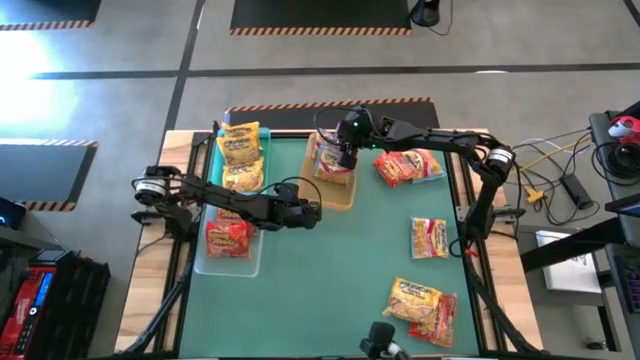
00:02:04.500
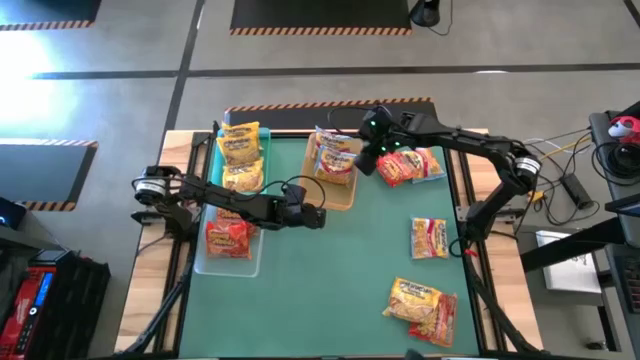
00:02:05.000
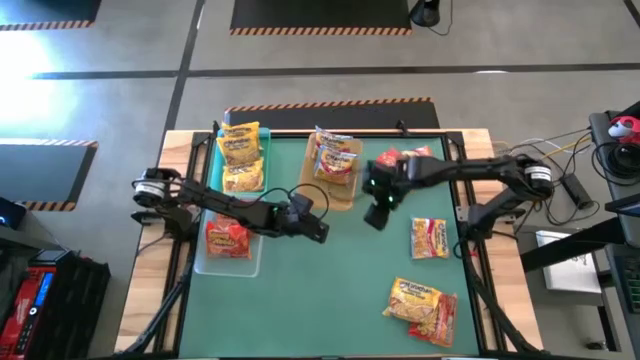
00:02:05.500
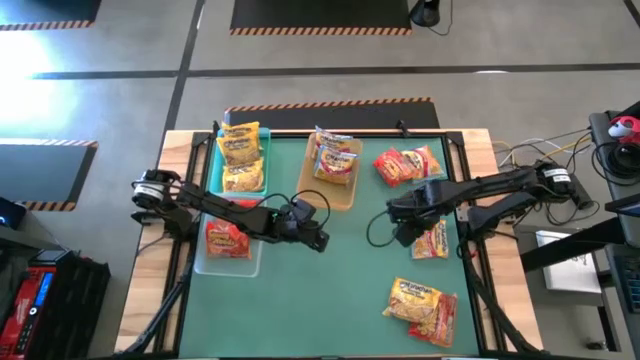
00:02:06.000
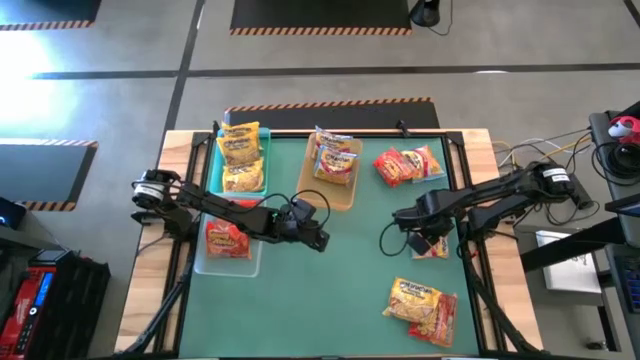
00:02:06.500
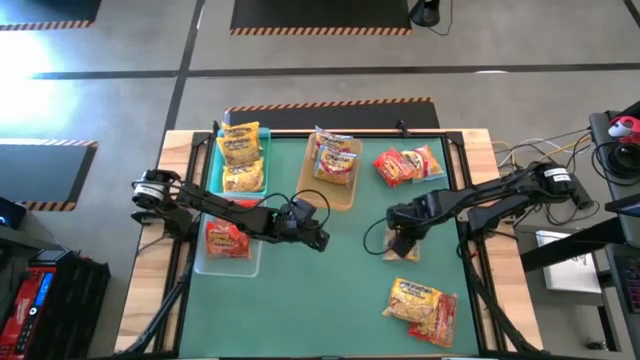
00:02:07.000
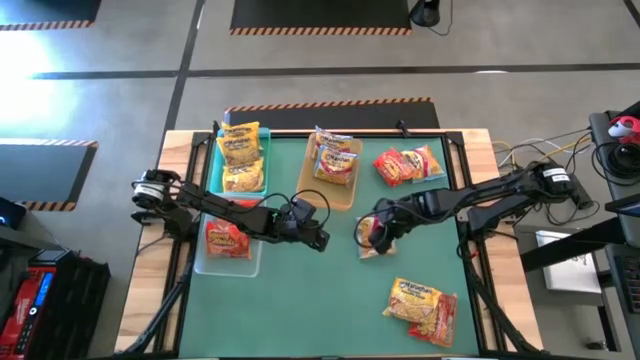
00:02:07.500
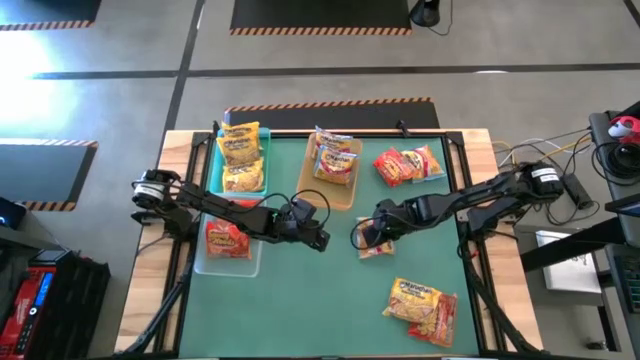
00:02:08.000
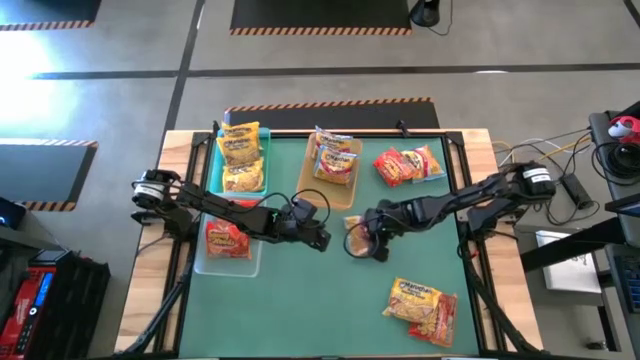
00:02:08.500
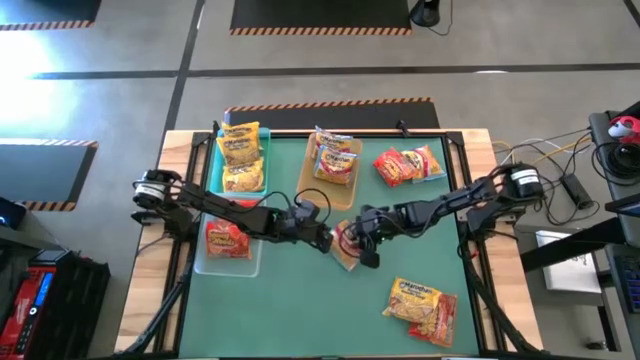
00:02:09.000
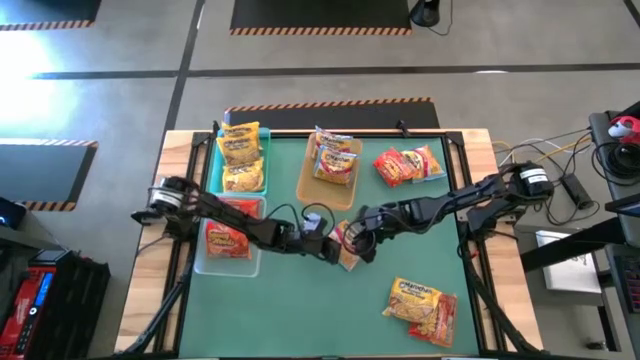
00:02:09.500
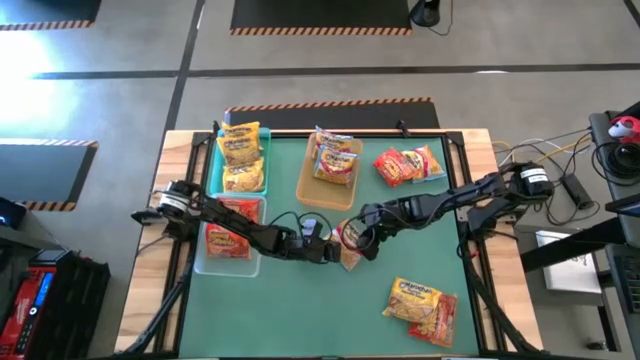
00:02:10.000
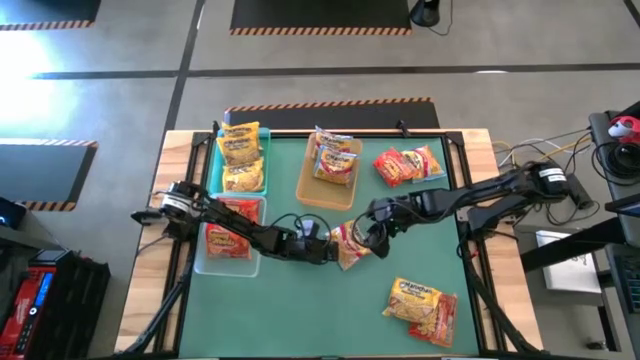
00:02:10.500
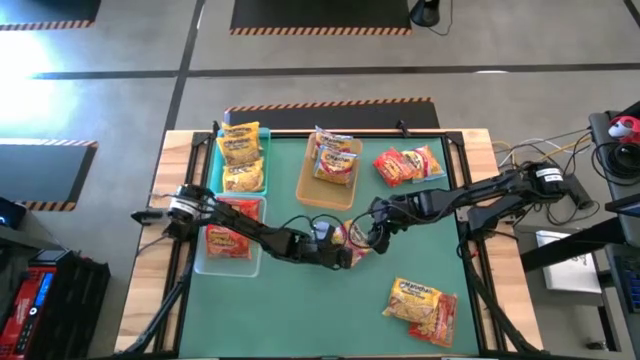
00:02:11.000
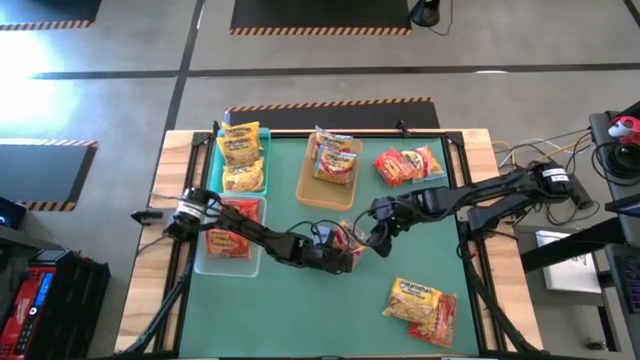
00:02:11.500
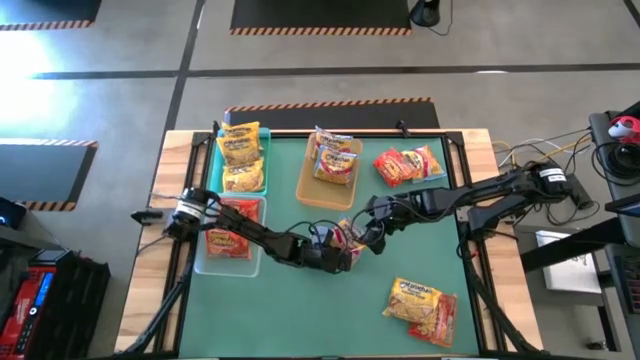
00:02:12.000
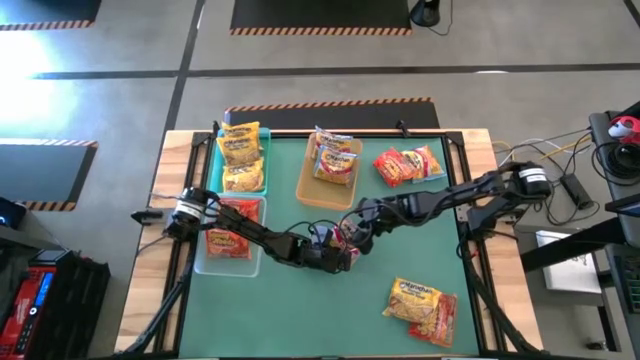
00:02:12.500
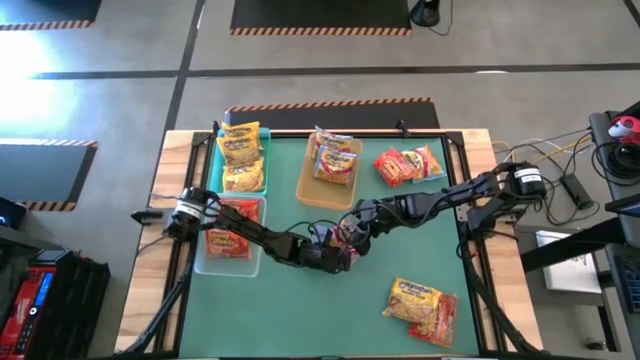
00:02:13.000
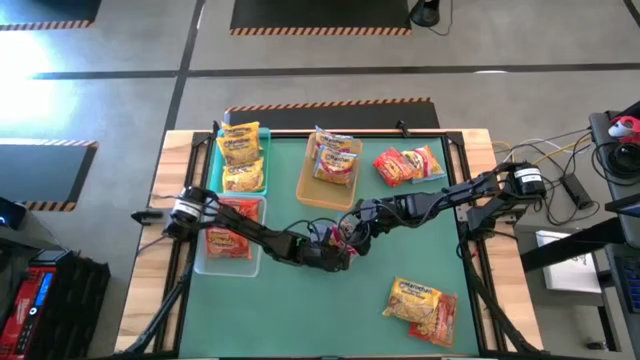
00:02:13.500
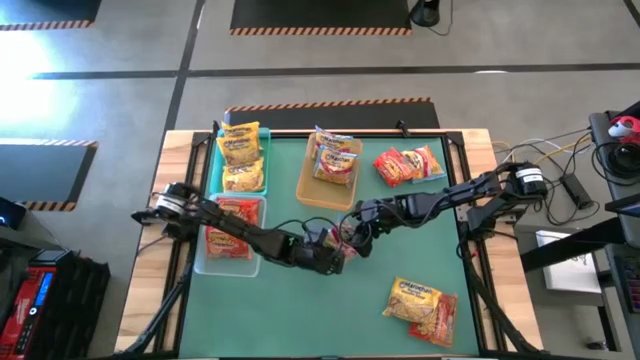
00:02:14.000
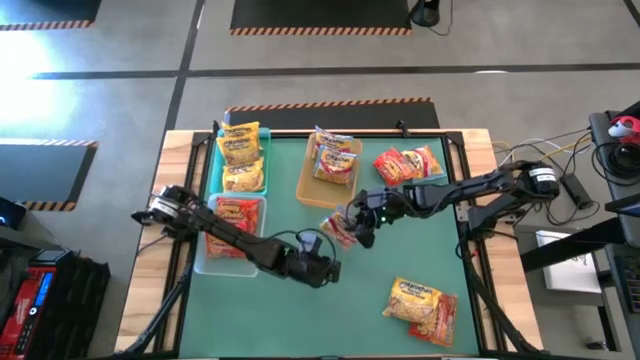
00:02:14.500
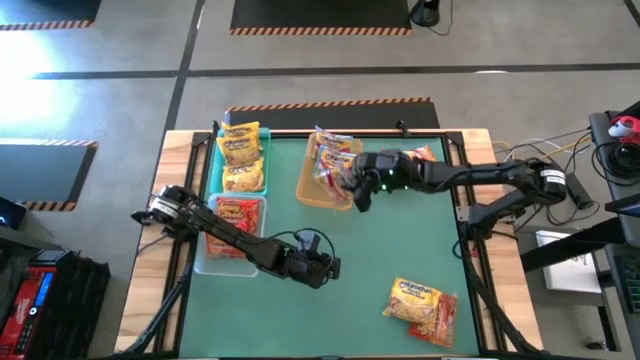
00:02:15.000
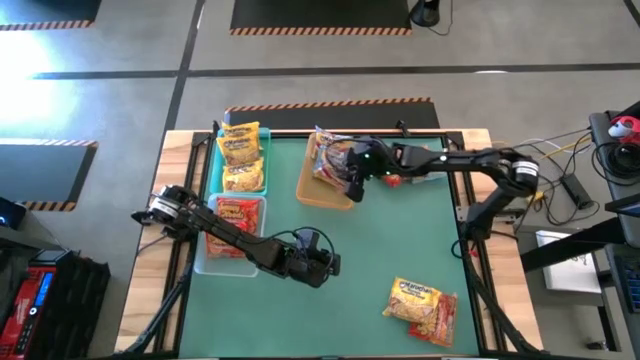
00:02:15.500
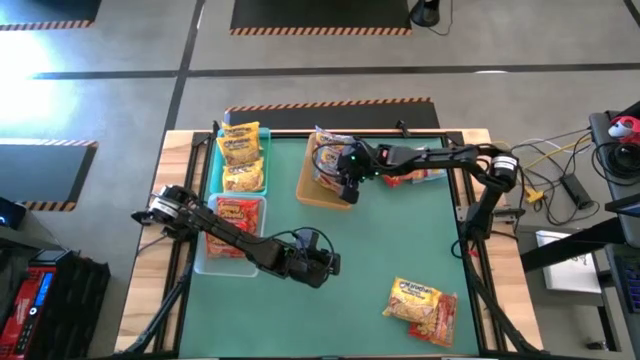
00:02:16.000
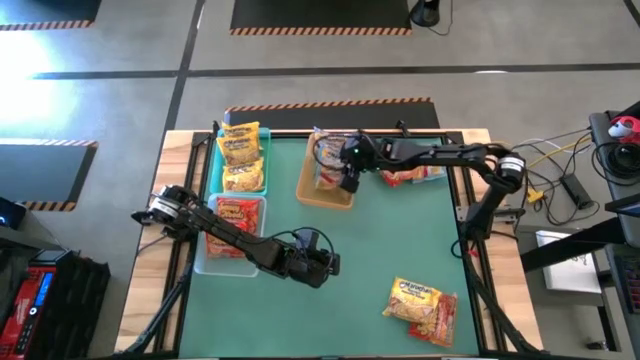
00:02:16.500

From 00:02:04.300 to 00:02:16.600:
Task: Sort Maruchan noodles
Put the blue noodle pack into the orange bin

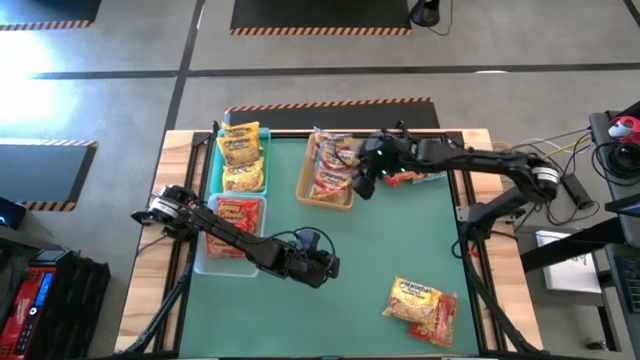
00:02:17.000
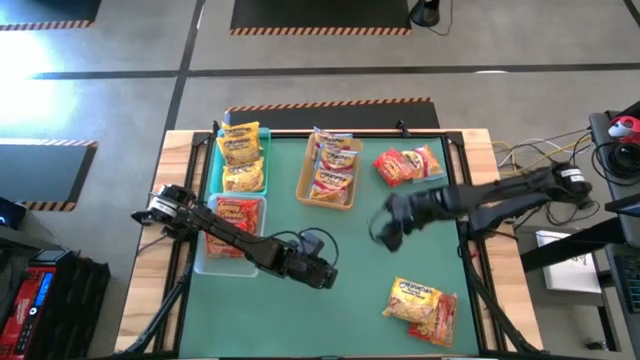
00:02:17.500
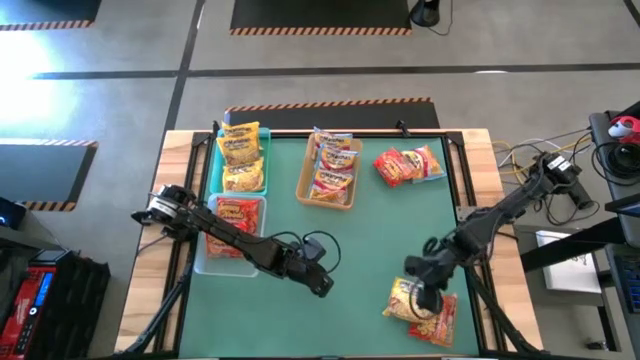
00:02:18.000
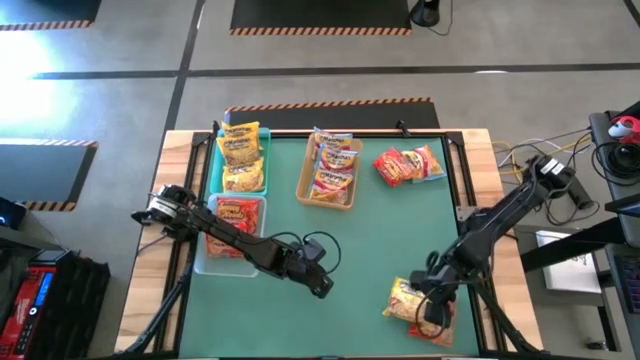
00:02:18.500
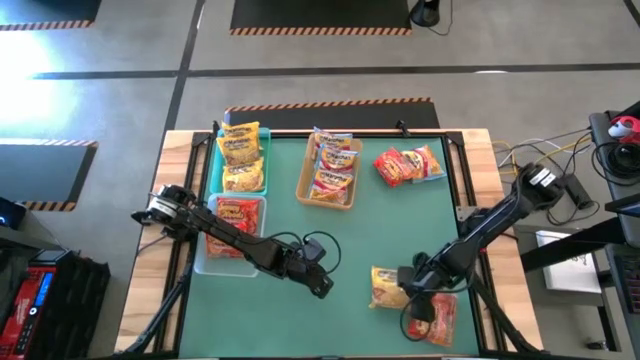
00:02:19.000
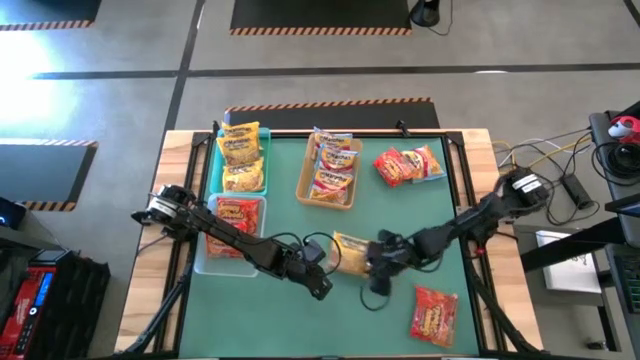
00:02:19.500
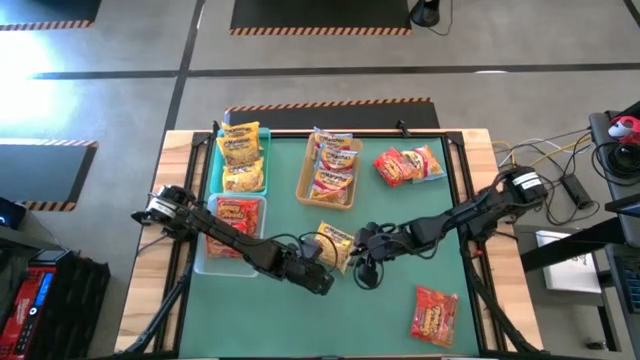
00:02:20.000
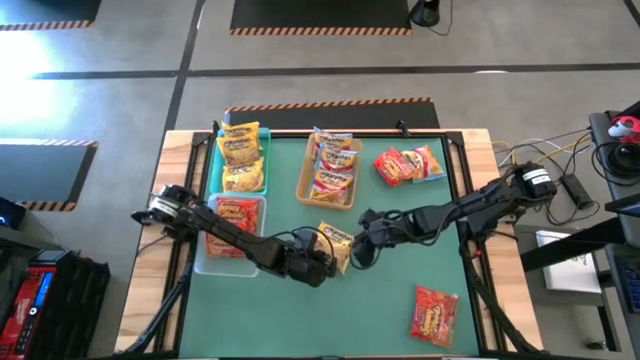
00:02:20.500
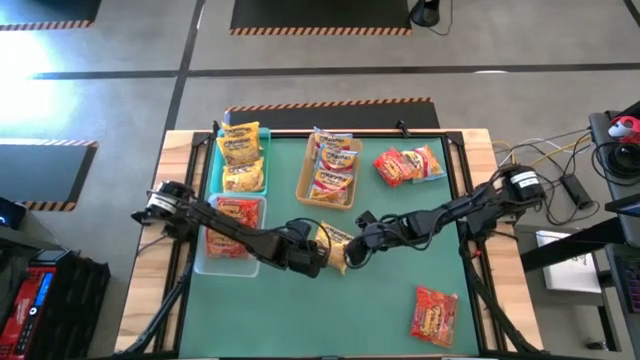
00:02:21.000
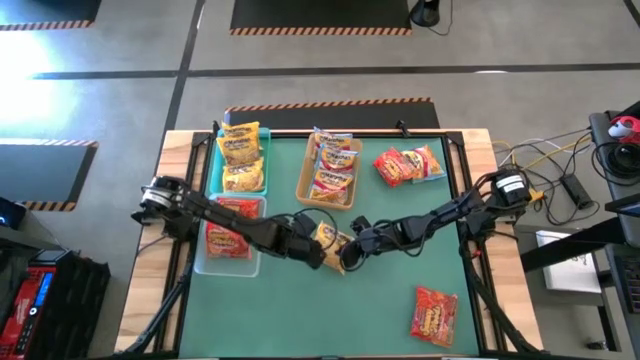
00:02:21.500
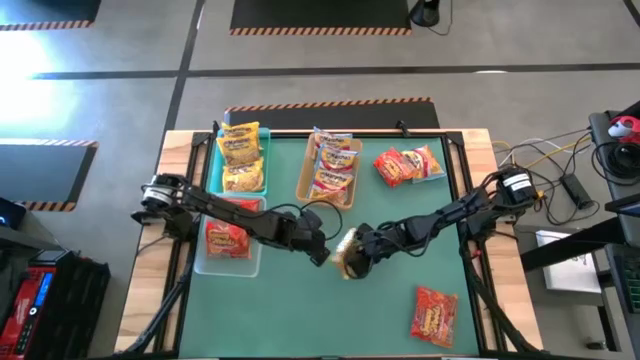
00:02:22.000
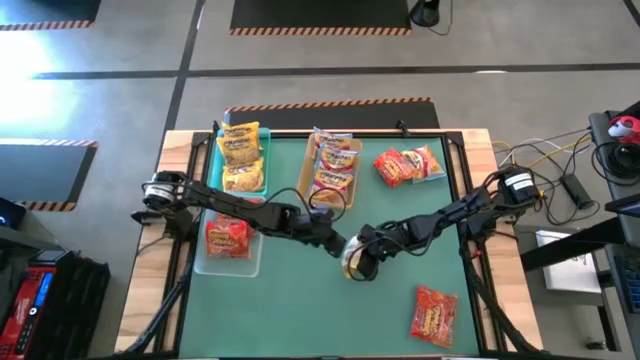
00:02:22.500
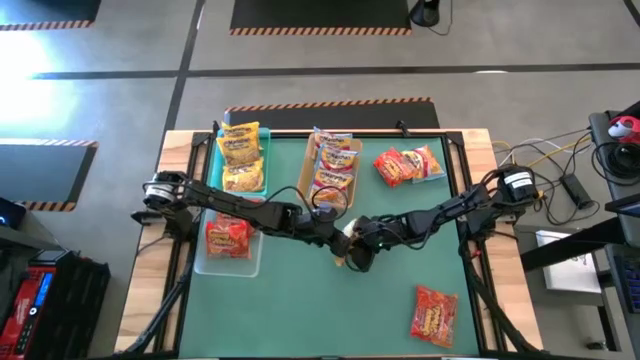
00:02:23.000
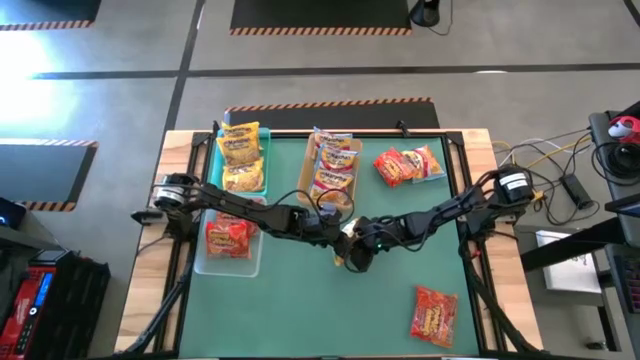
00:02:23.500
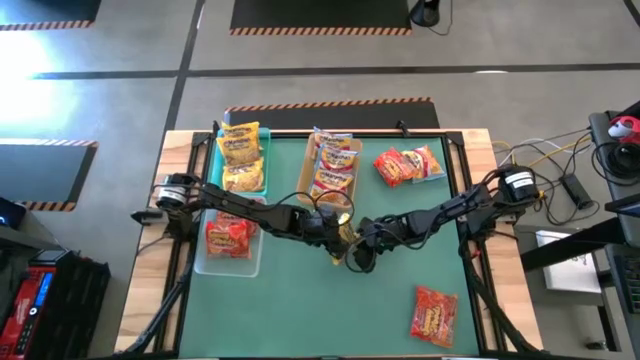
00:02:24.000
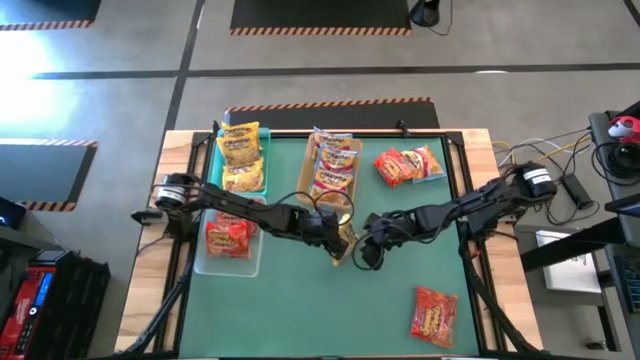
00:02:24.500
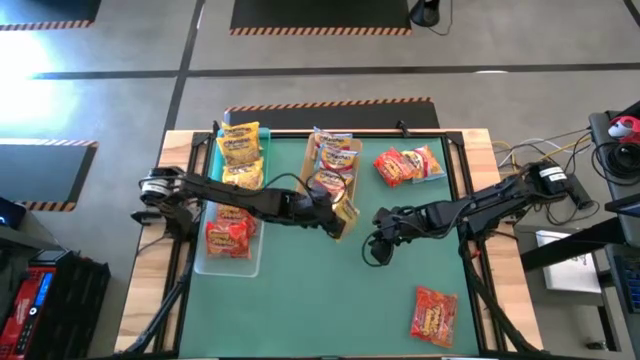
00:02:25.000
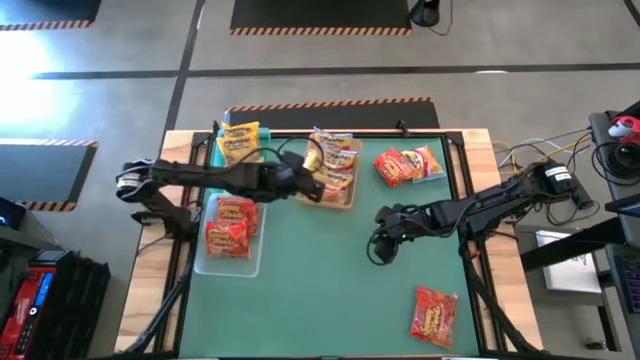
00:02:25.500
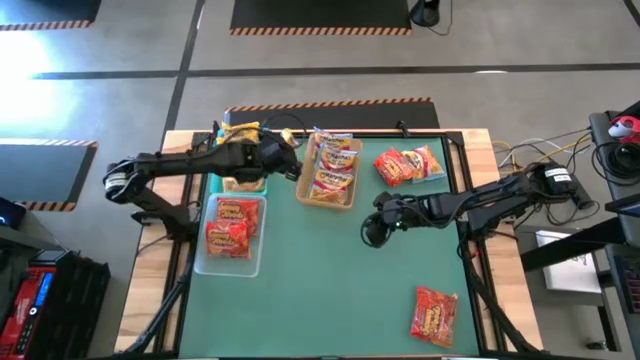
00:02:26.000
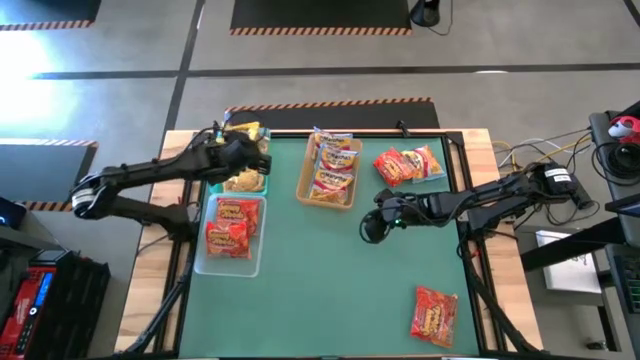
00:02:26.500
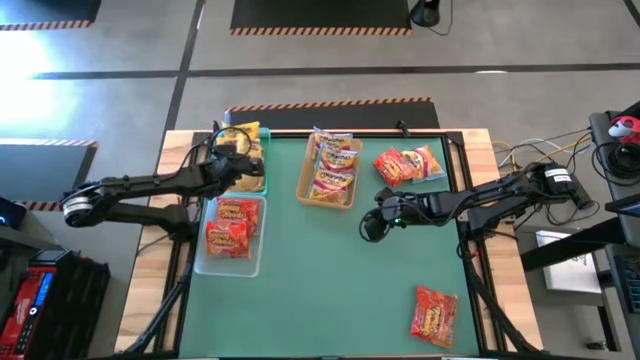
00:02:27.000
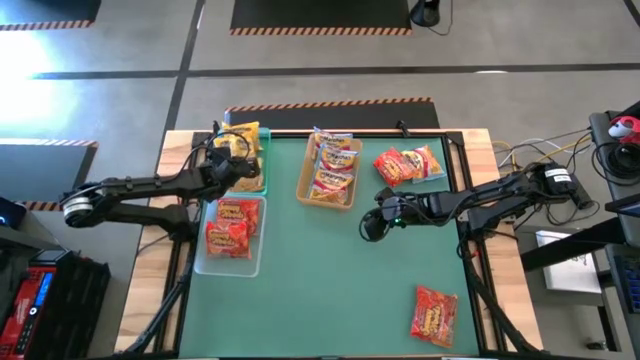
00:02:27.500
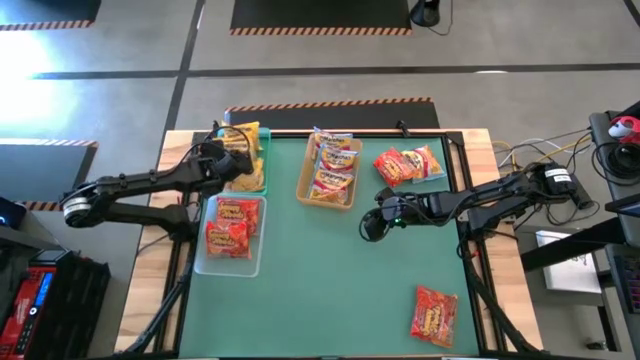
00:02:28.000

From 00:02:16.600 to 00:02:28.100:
Put the yellow noodle pack into the blue bin
